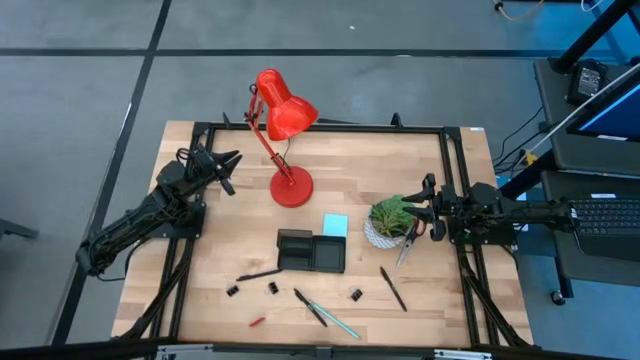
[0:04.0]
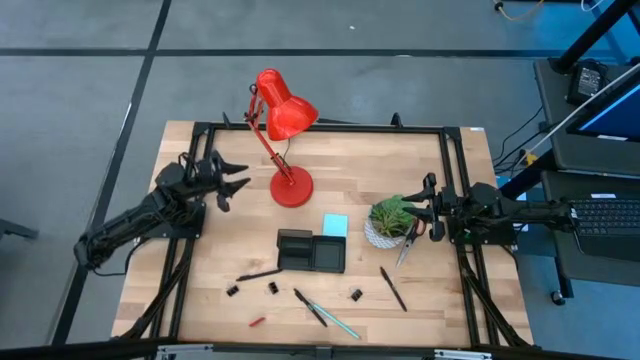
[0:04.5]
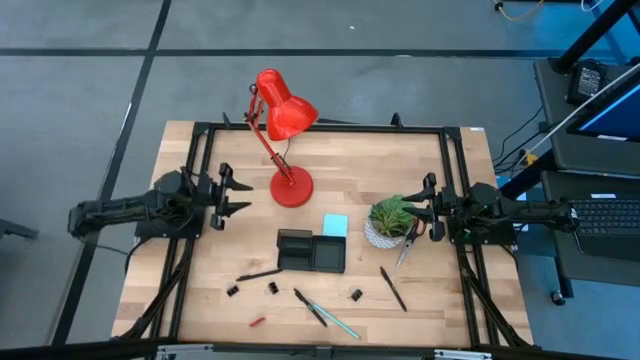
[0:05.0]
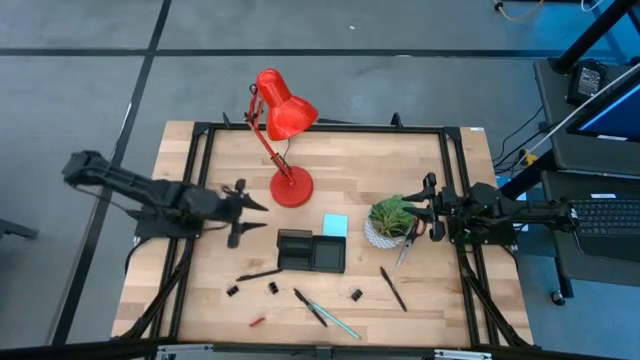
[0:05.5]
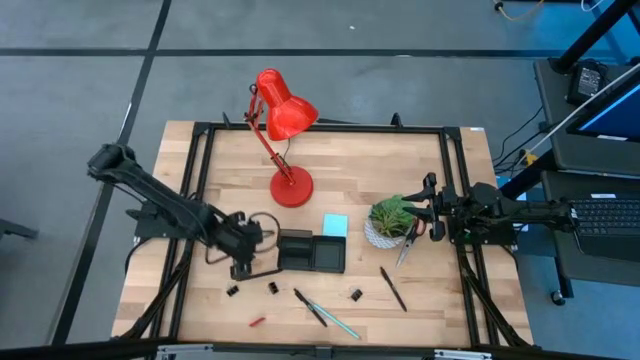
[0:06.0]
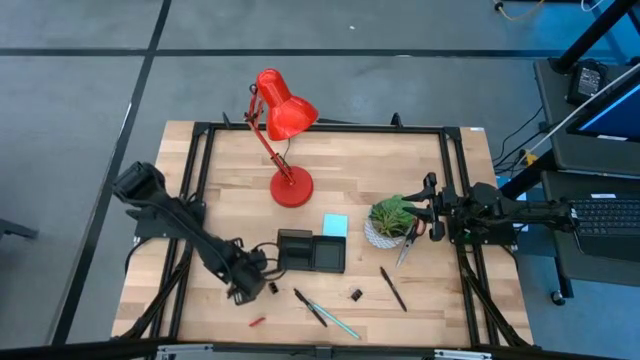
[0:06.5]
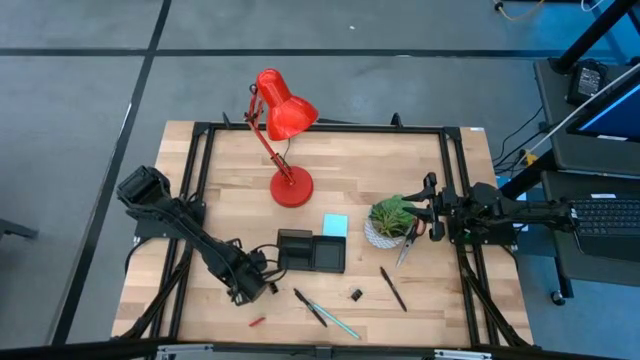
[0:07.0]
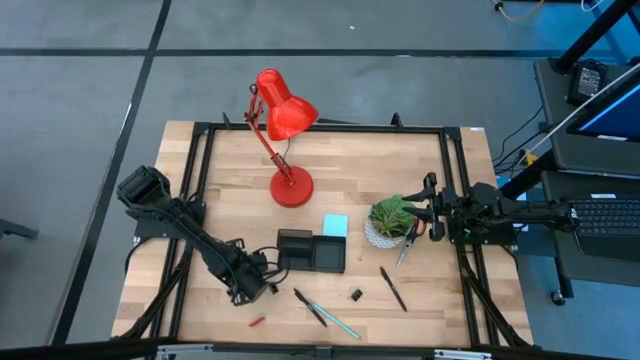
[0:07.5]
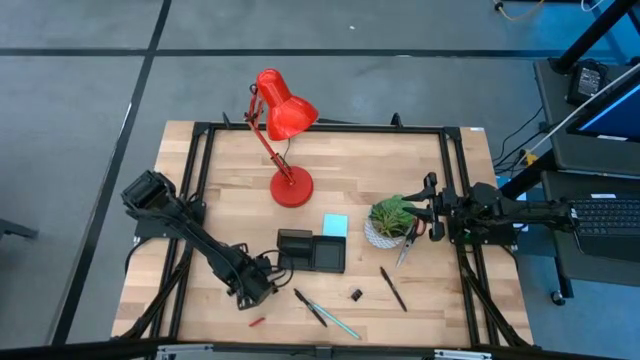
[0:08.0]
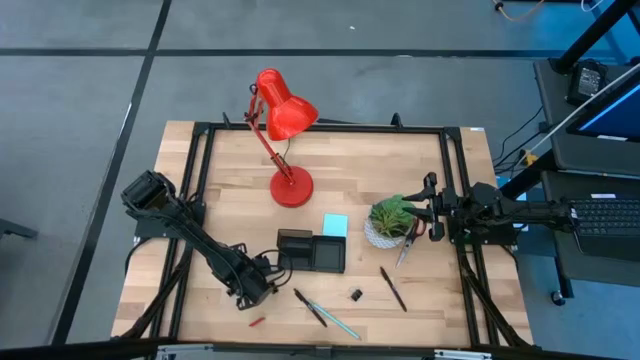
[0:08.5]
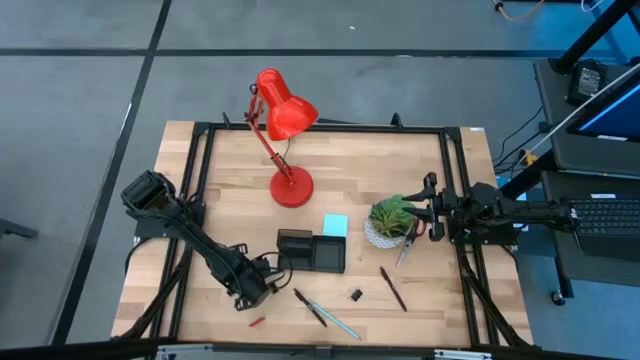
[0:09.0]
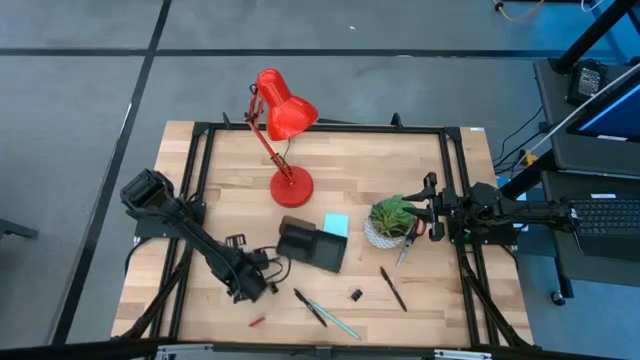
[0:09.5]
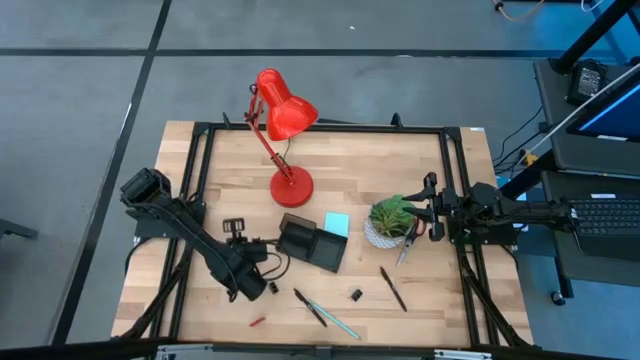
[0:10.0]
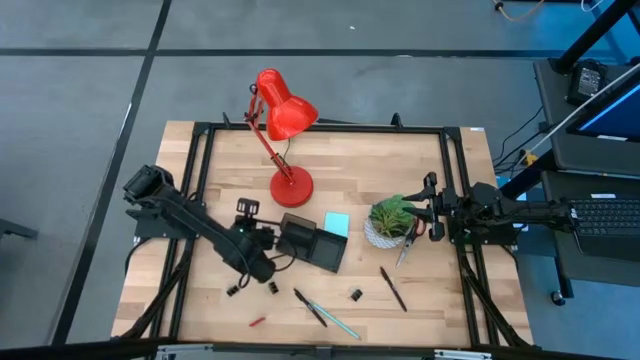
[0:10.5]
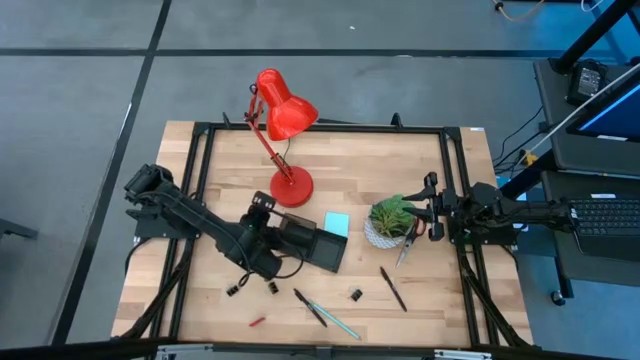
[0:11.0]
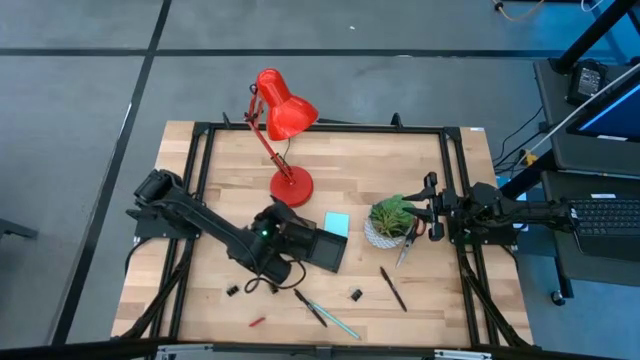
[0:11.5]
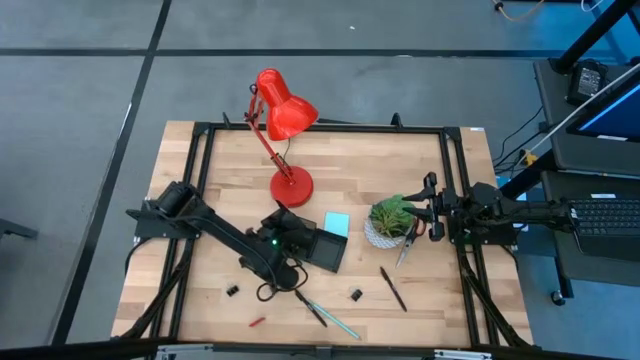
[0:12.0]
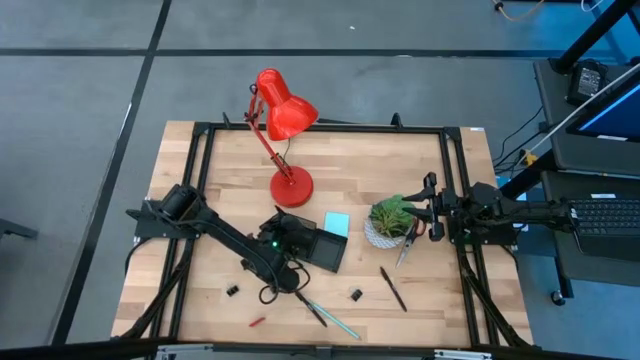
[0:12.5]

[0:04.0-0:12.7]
Task: Pick and place office supplies into organizer
Put the top left black pen into the black desk organizer

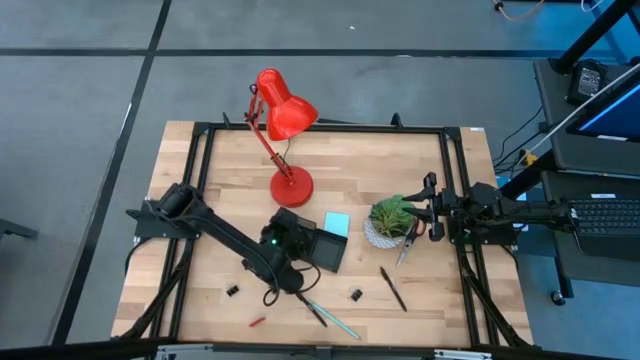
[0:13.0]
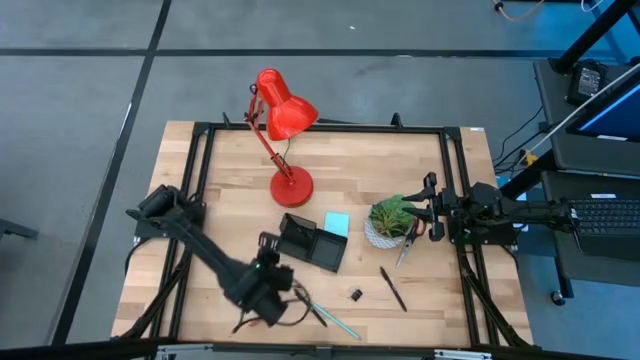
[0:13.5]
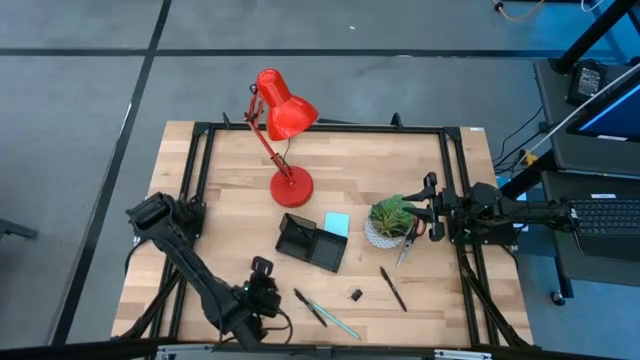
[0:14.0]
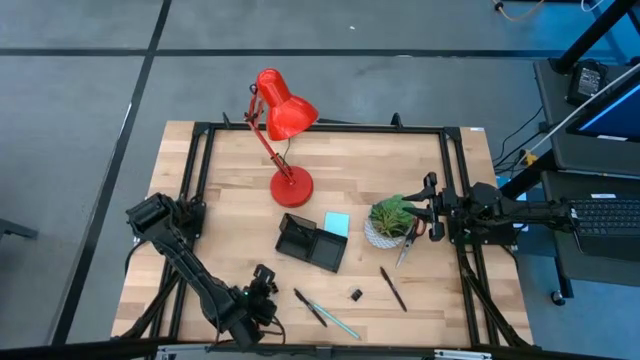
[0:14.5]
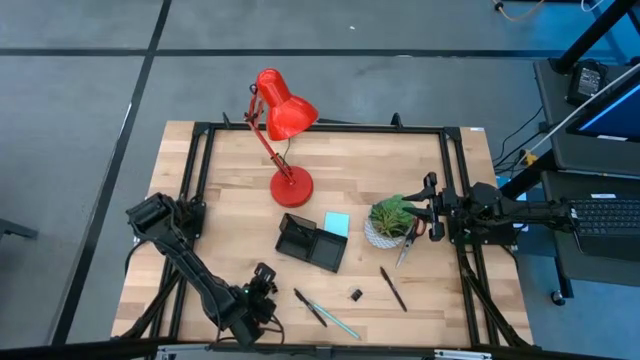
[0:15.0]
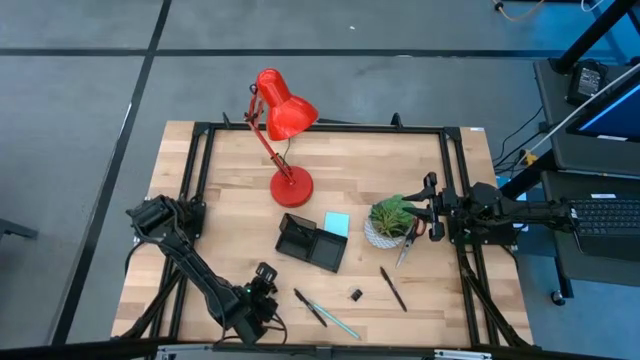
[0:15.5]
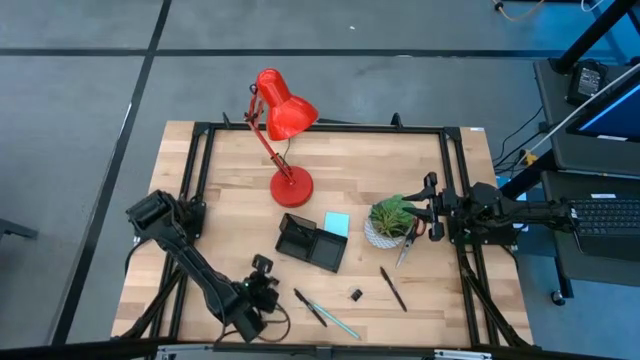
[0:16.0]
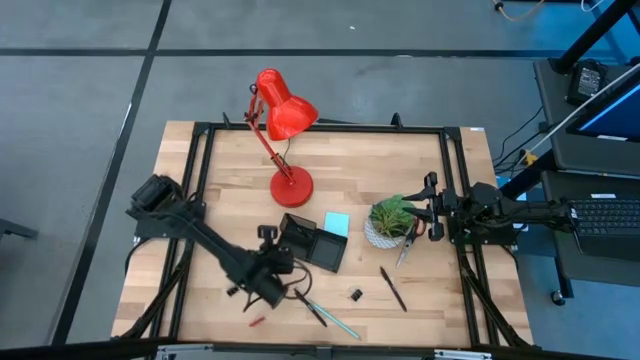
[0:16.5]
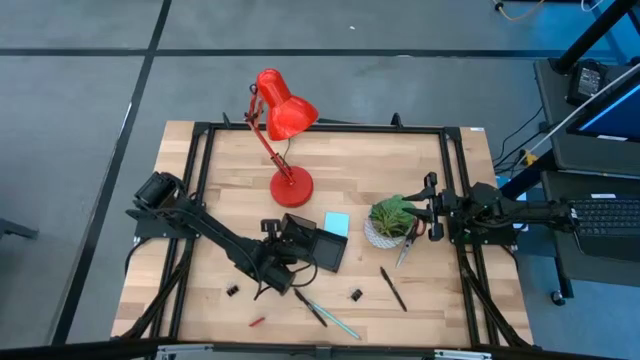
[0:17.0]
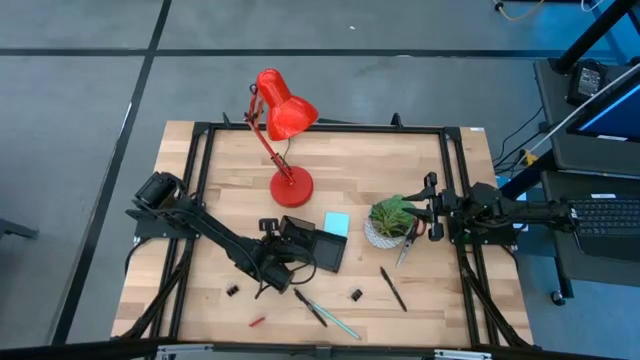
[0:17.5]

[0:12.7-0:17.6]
Put the middle black binder clip into the black desk organizer

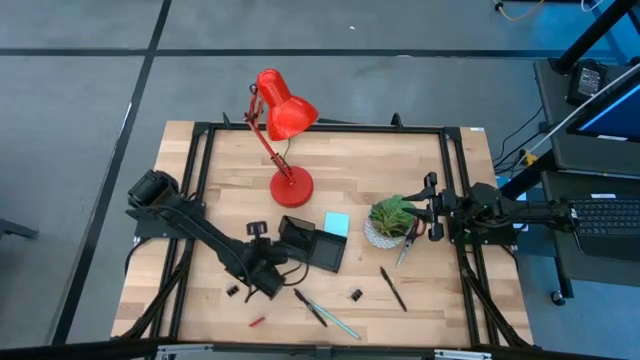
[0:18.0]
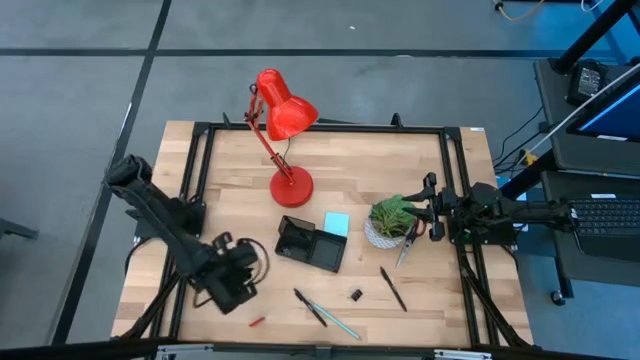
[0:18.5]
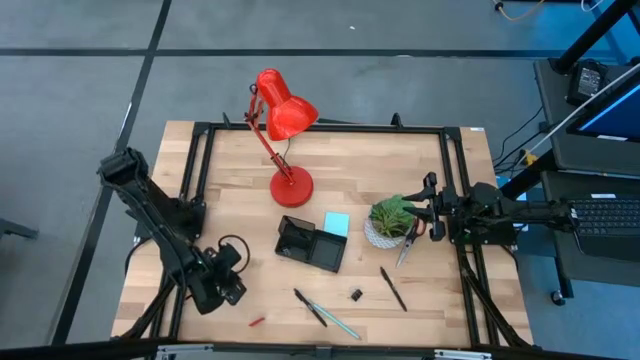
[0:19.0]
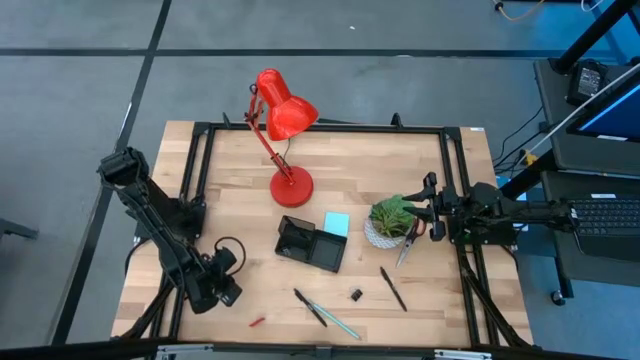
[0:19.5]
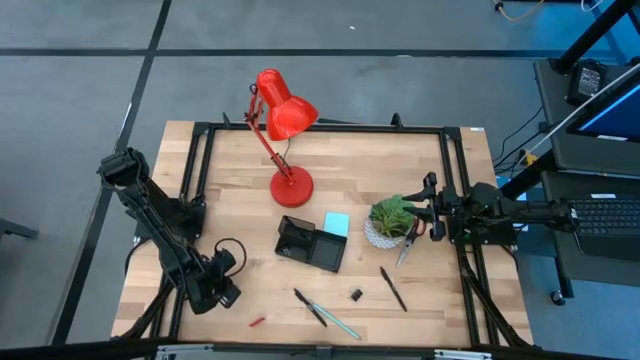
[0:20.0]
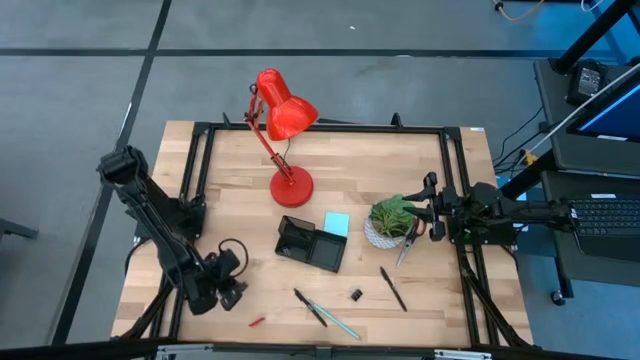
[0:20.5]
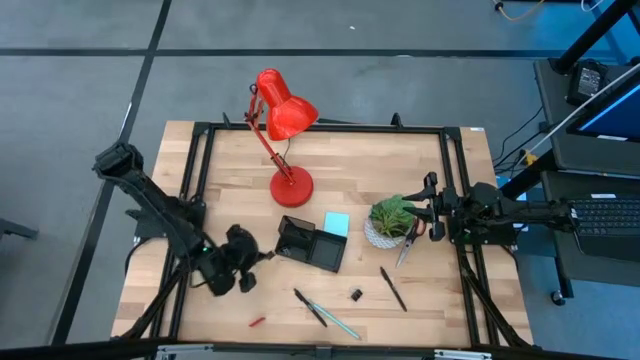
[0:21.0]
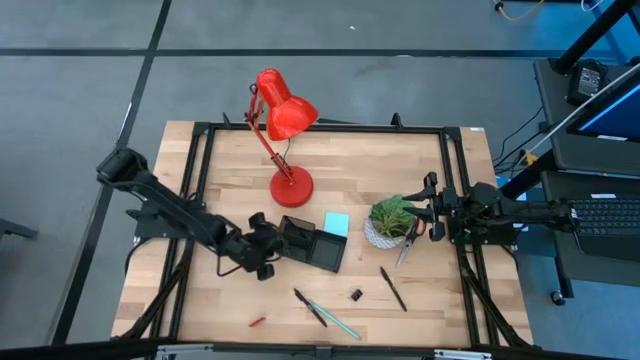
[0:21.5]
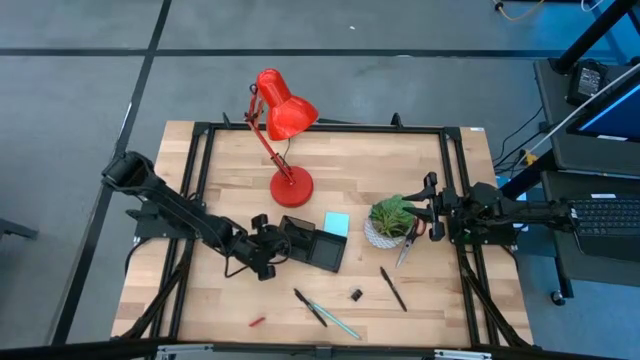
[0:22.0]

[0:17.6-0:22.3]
Put the left black binder clip into the black desk organizer

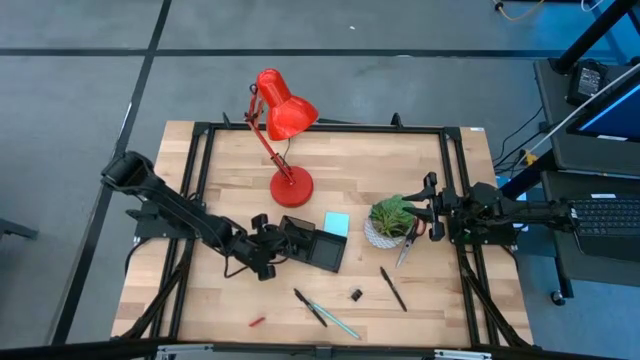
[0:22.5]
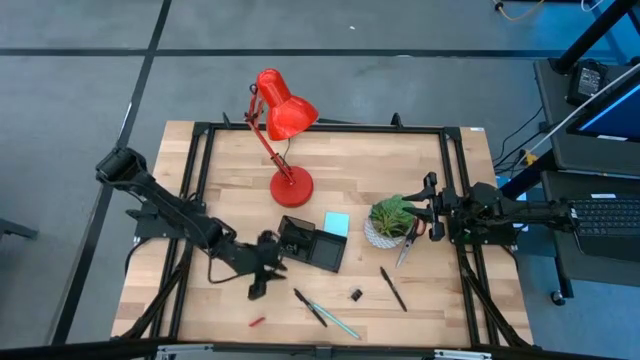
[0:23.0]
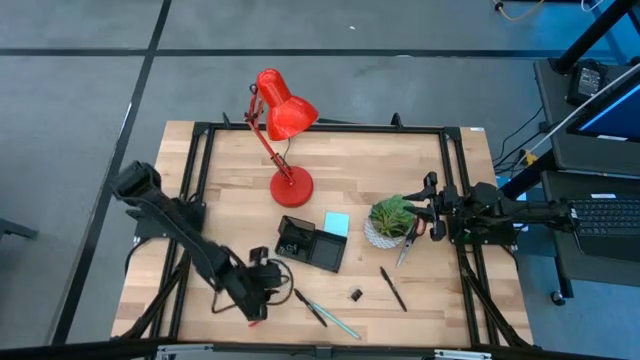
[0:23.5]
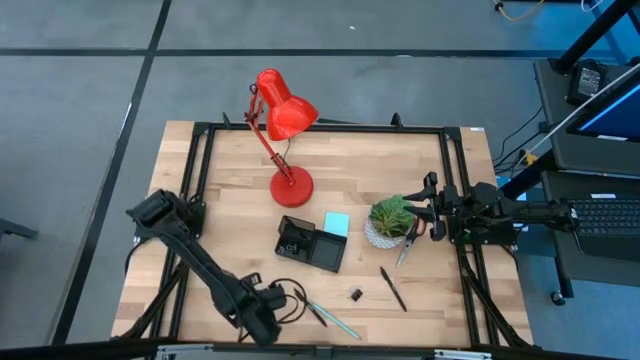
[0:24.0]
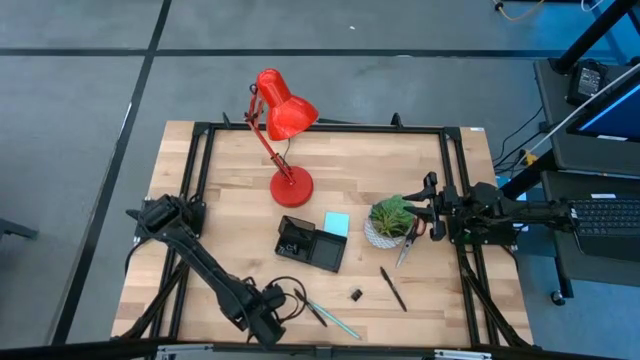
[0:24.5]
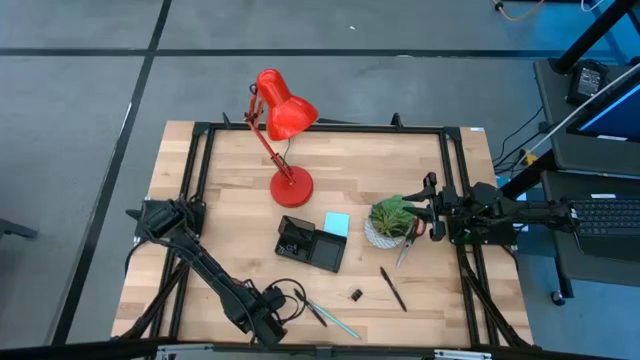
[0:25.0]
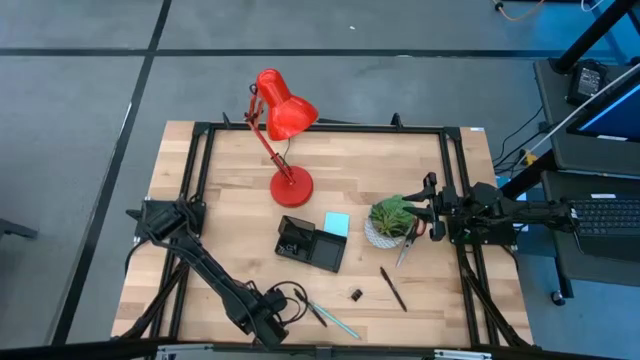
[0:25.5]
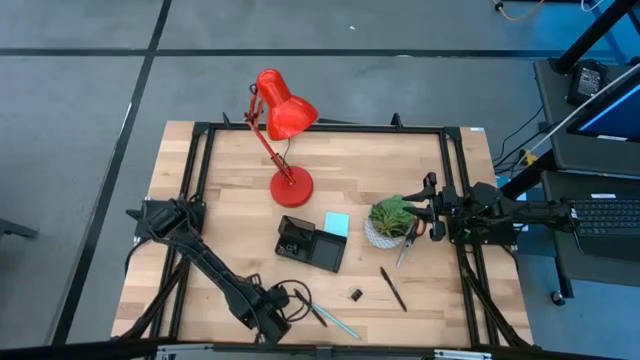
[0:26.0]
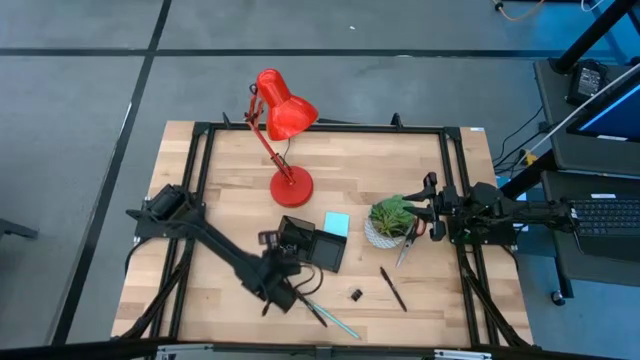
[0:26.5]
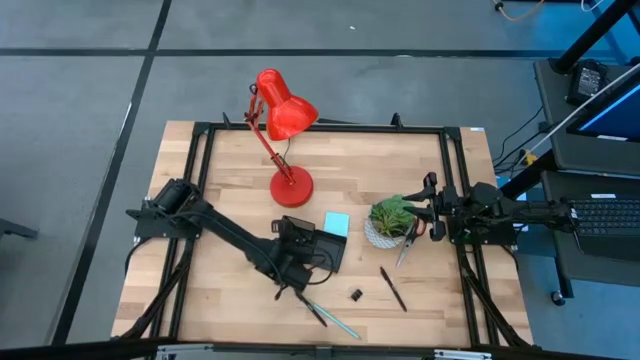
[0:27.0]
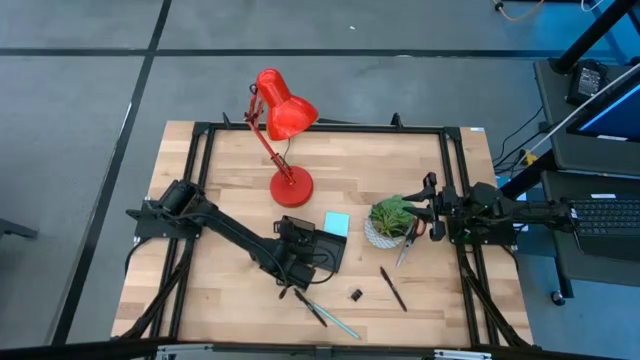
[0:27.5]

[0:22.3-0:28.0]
Put the red eraser into the black desk organizer
